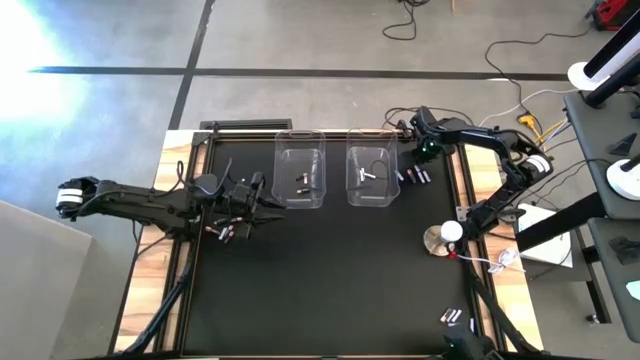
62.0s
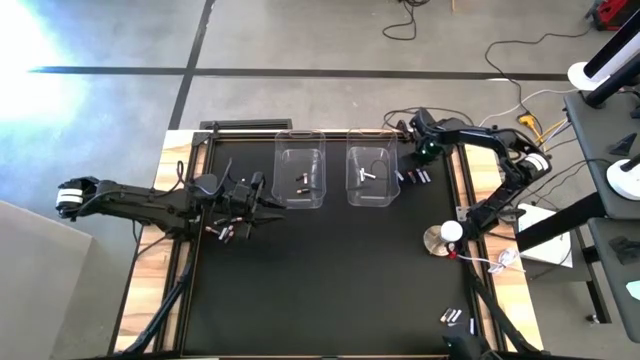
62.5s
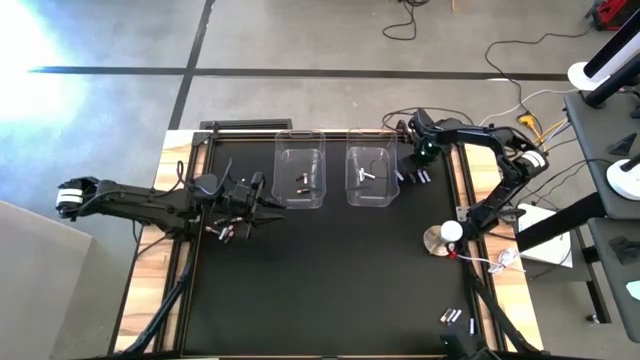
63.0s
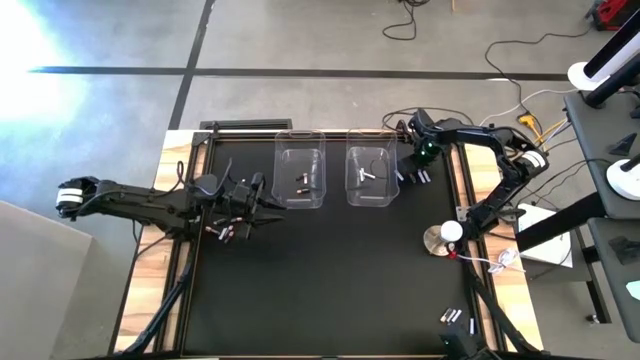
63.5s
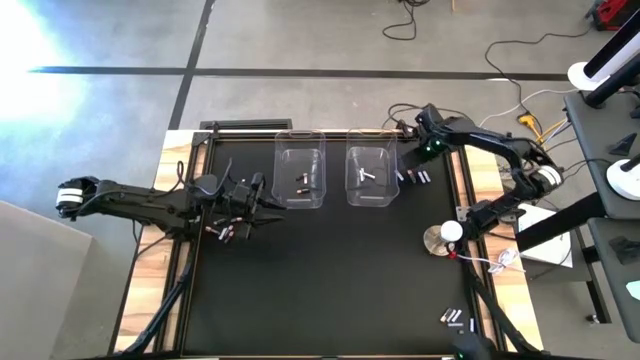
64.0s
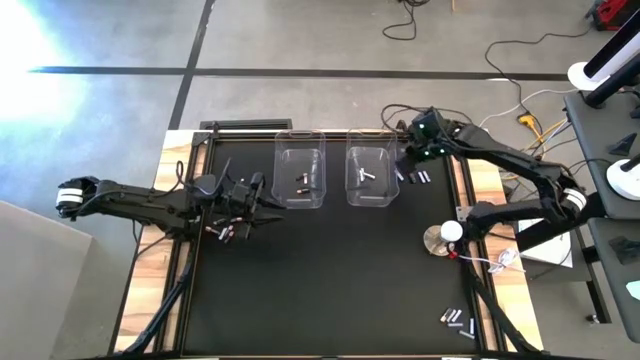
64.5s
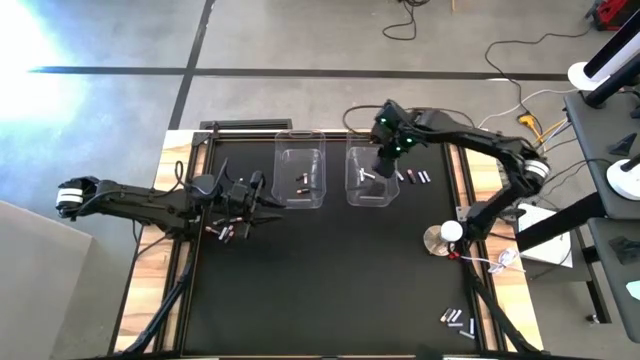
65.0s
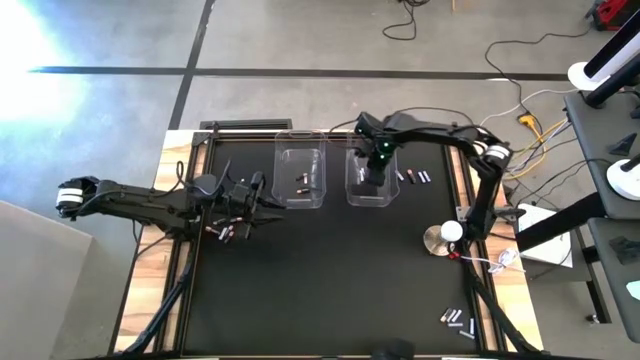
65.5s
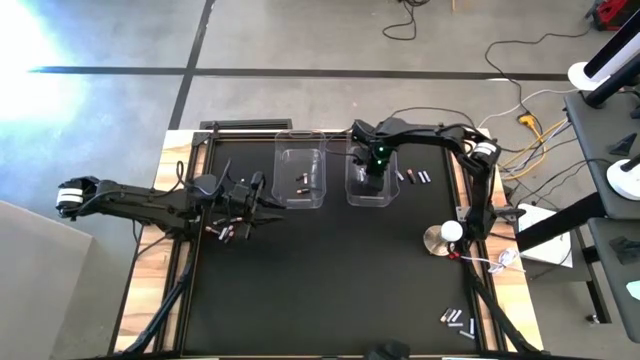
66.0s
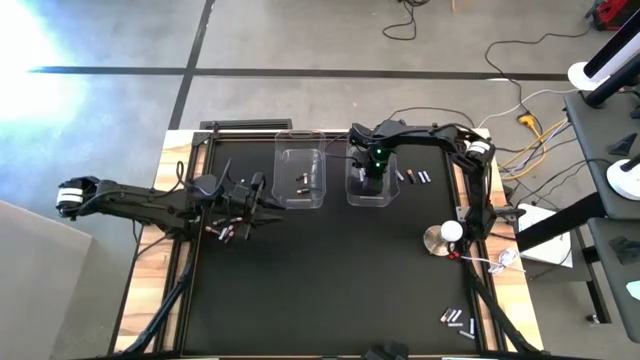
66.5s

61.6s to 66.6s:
Task: Sort batteries
Put the white battery into the right transparent bin

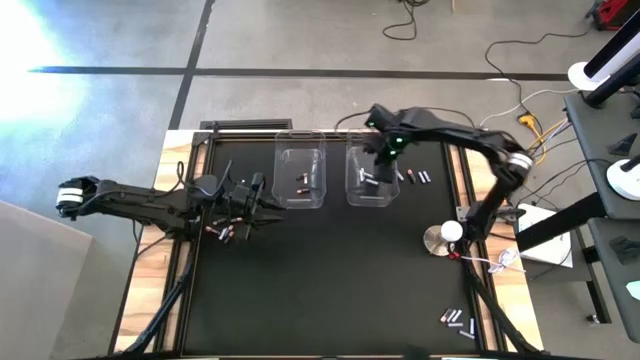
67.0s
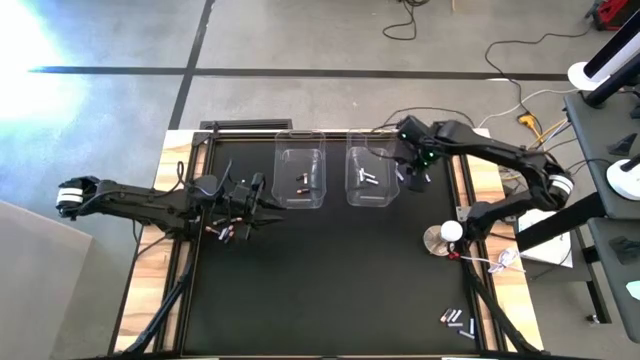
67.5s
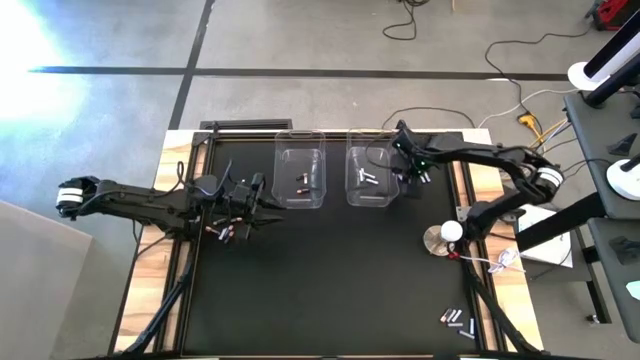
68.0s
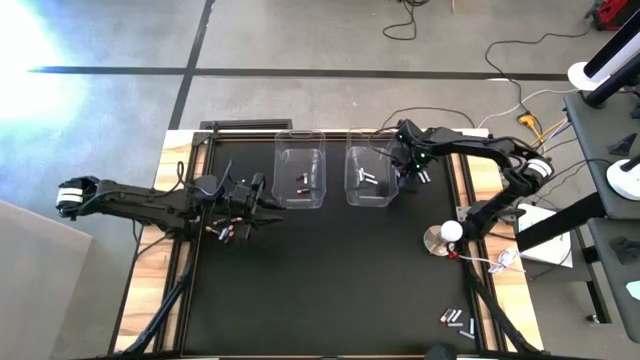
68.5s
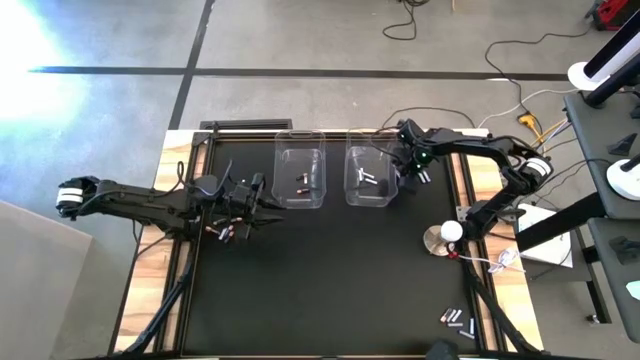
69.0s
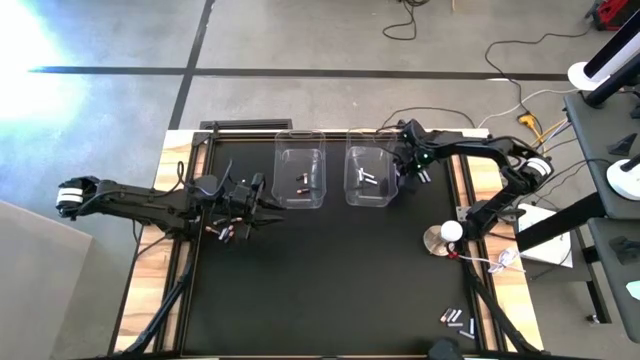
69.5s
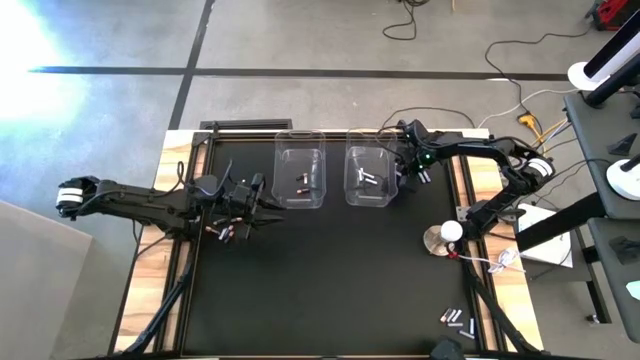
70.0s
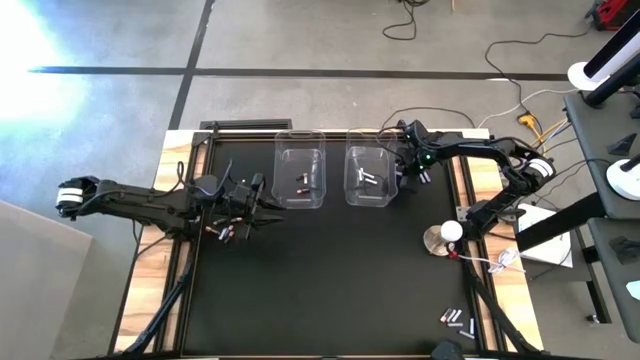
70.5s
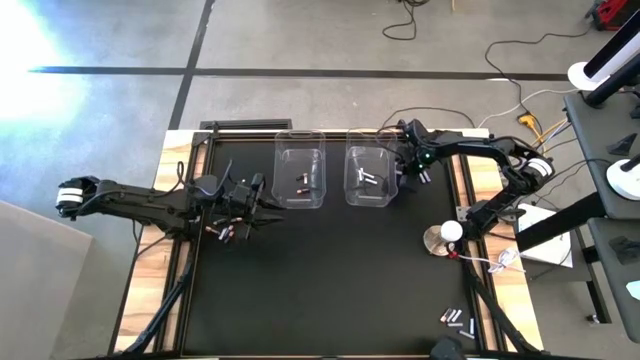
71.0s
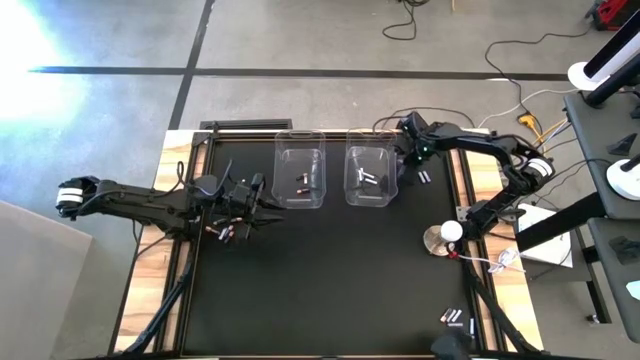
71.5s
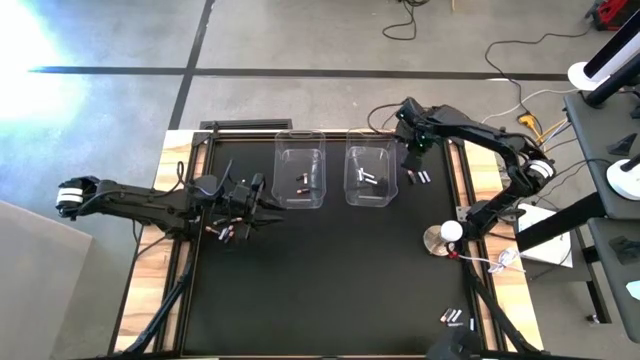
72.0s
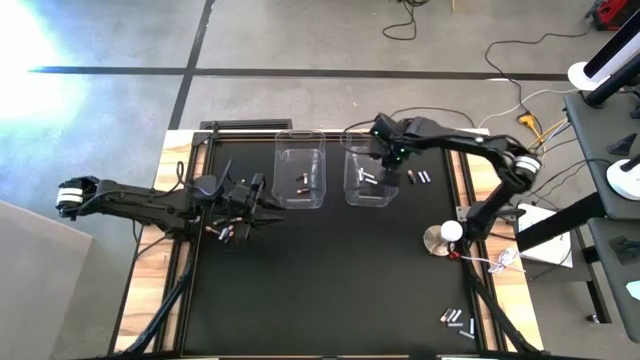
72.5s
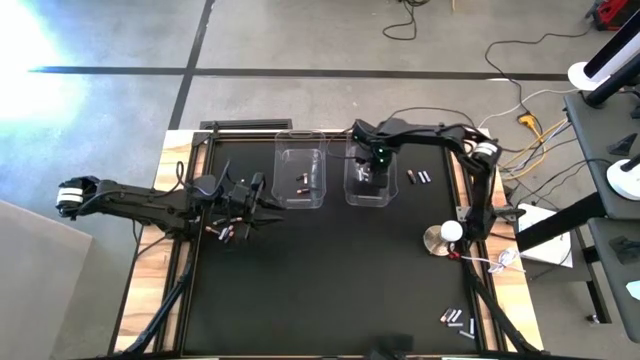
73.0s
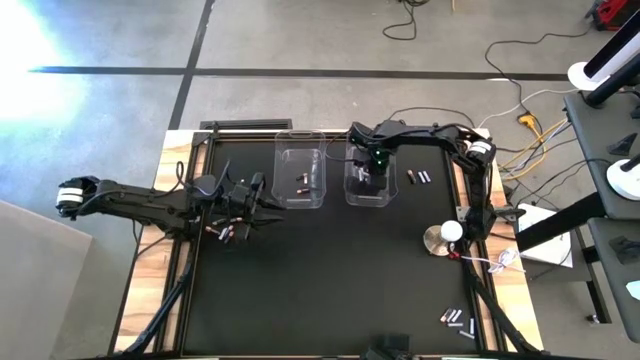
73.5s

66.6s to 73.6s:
Put the white battery into the right transparent bin

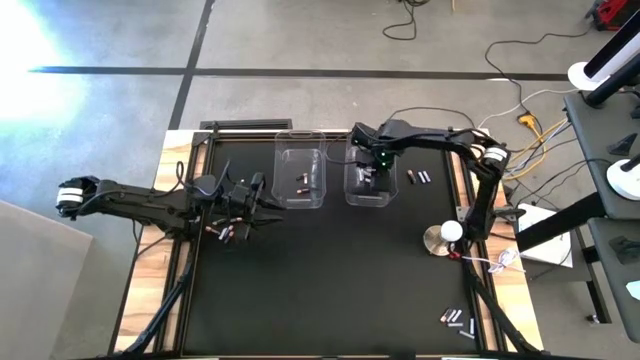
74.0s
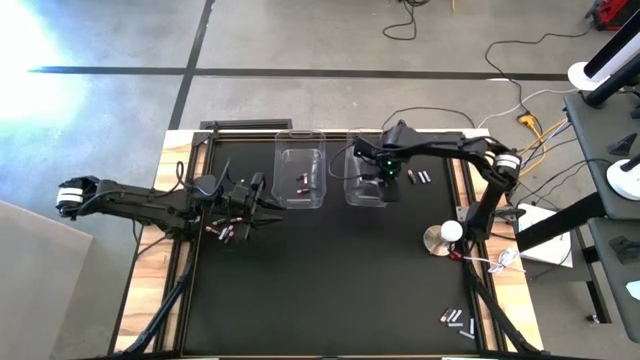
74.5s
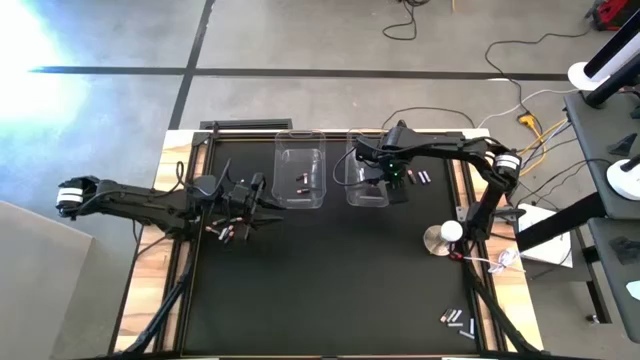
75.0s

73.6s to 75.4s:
Adjust the right transparent bin

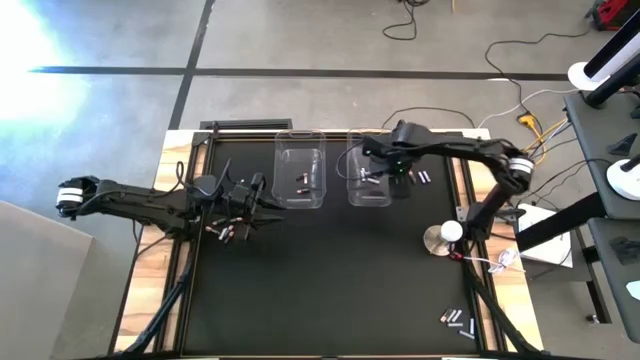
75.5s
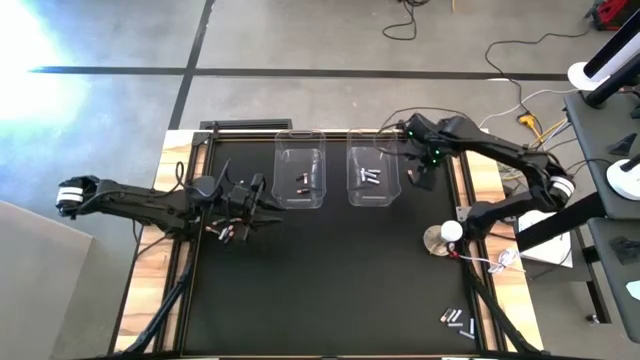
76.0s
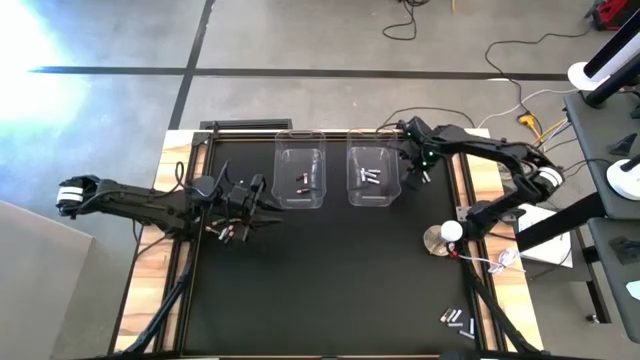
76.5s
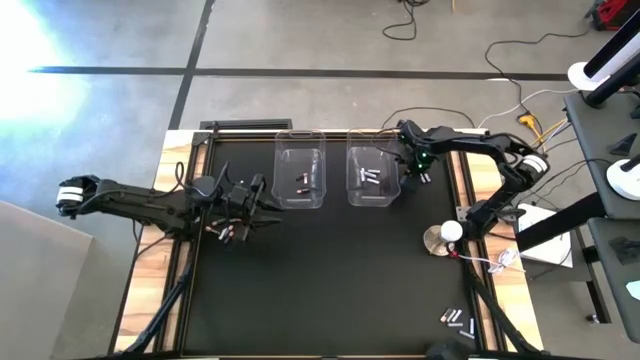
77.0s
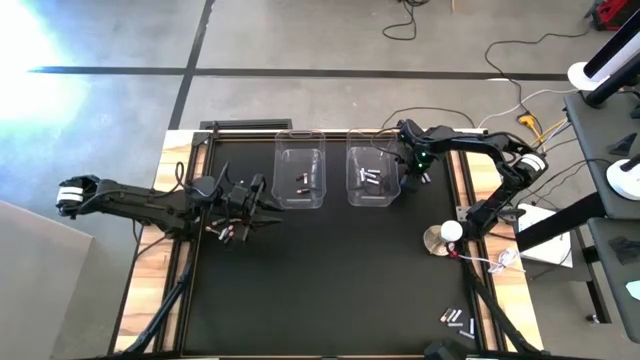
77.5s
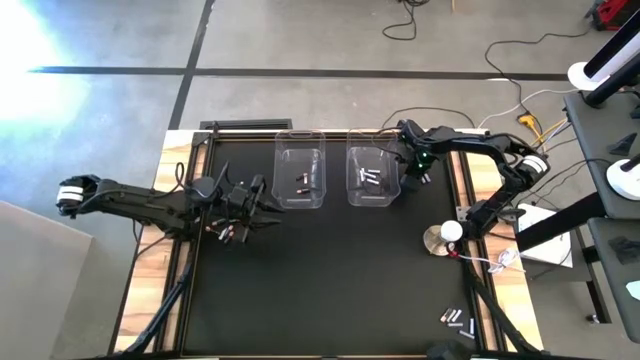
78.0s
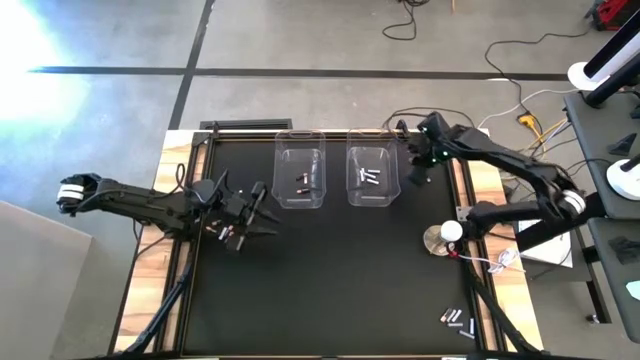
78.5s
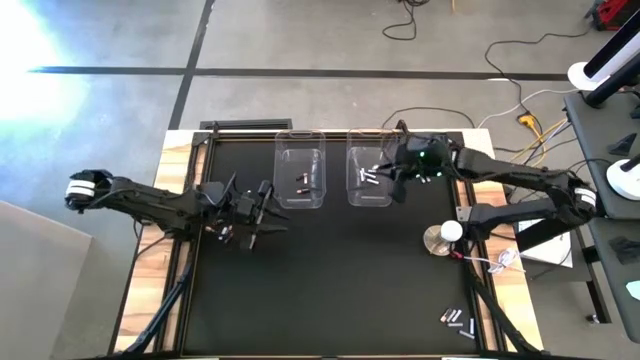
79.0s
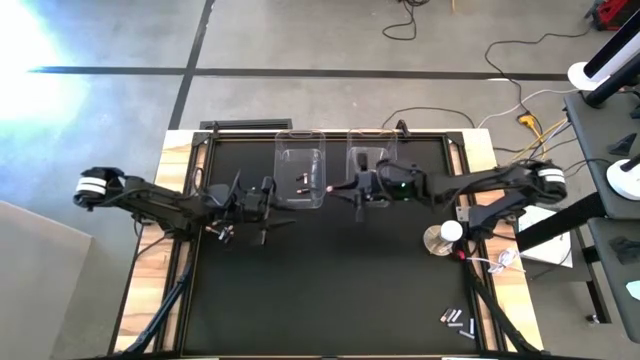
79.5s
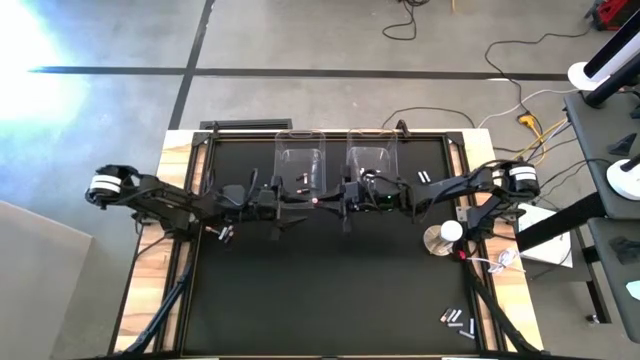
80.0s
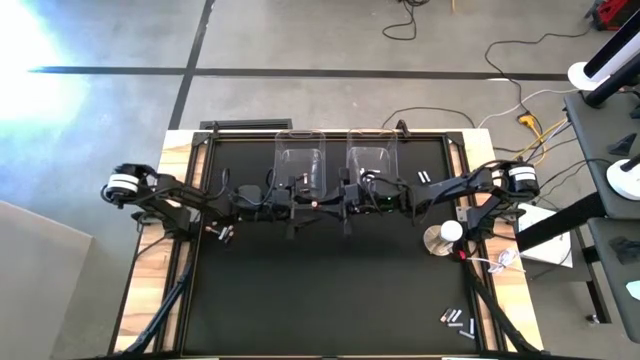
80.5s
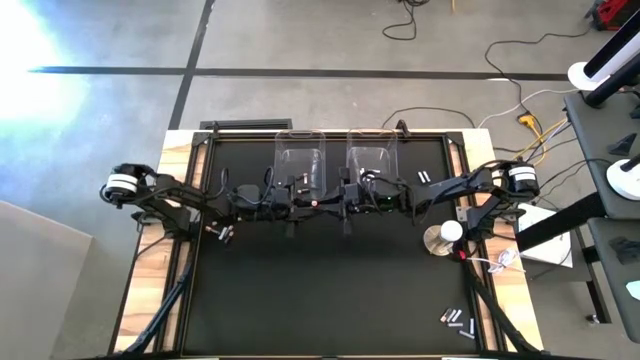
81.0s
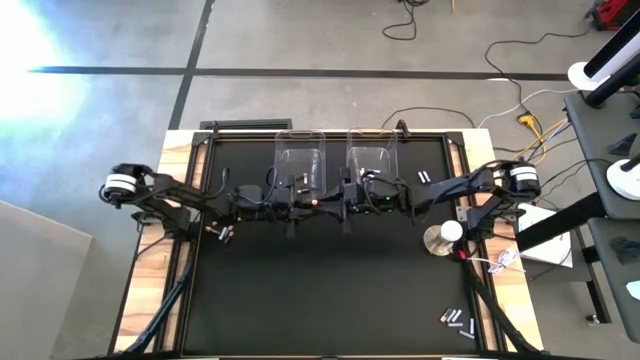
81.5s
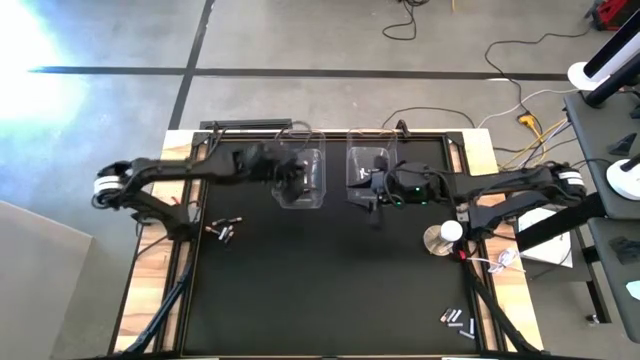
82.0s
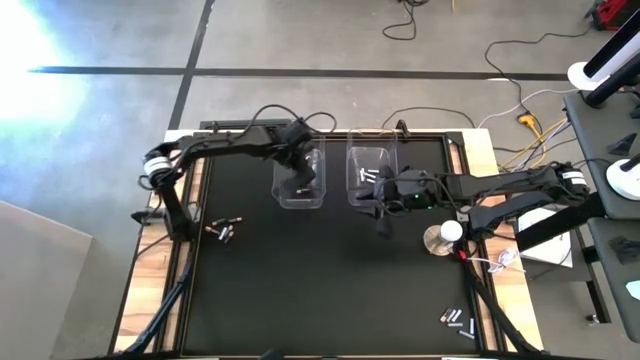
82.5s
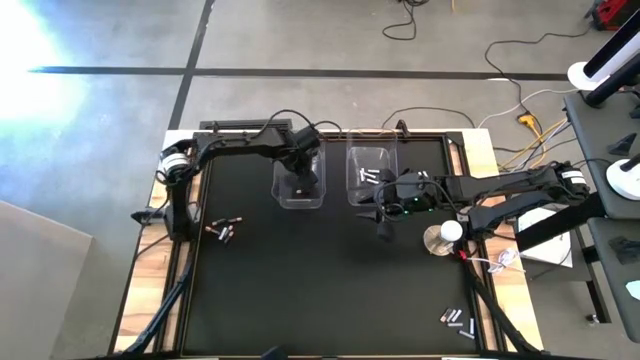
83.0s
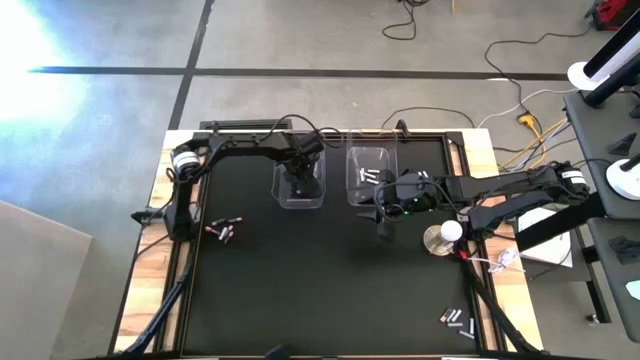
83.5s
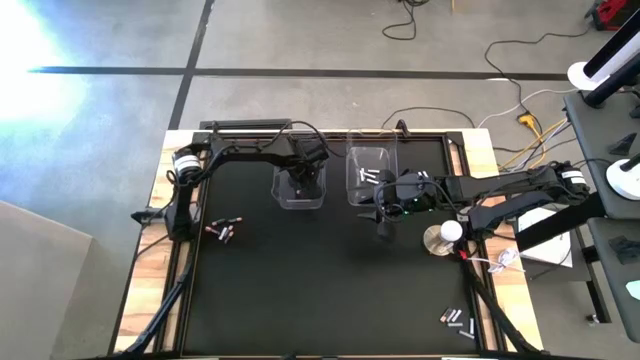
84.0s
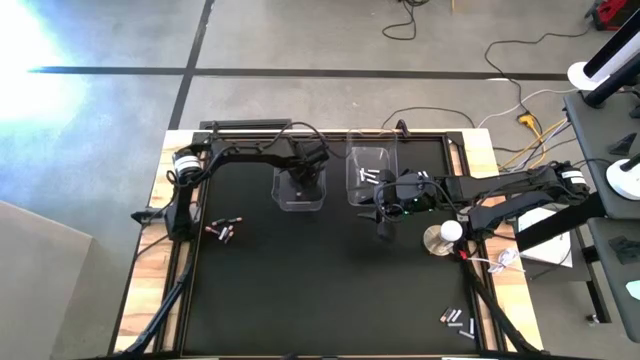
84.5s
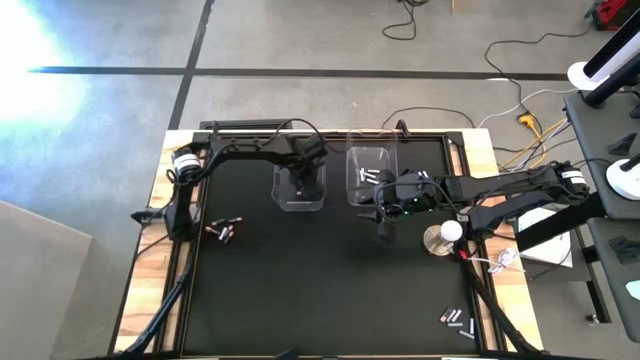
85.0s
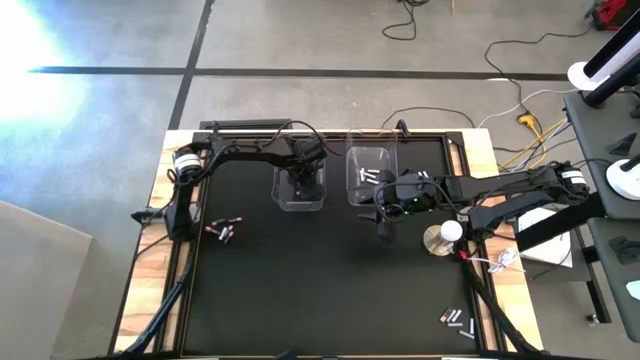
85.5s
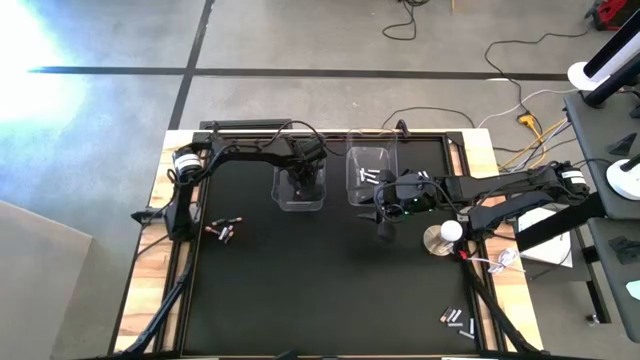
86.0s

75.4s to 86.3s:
Put the black battery into the left transparent bin
